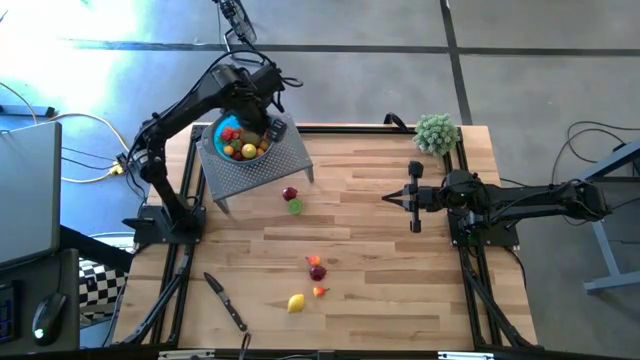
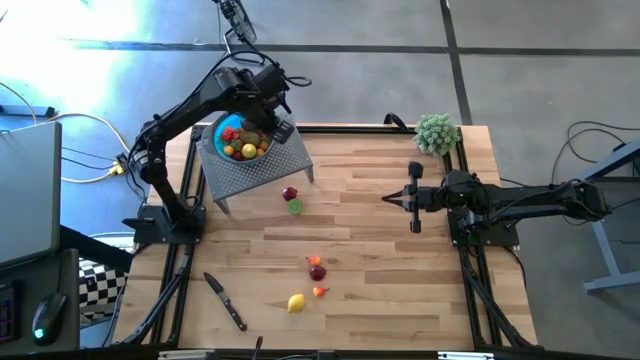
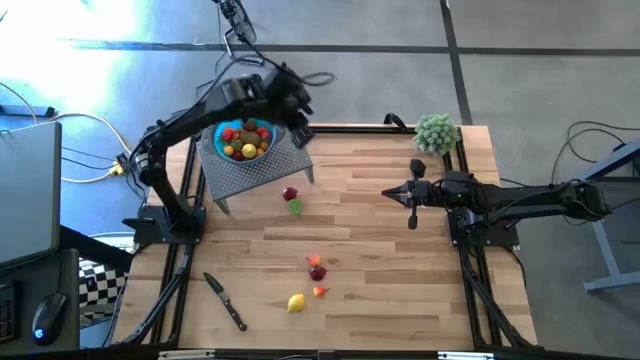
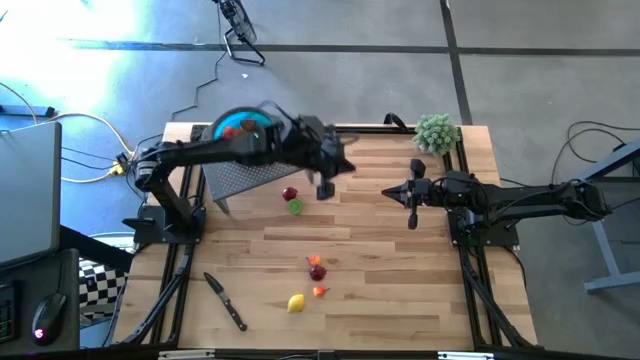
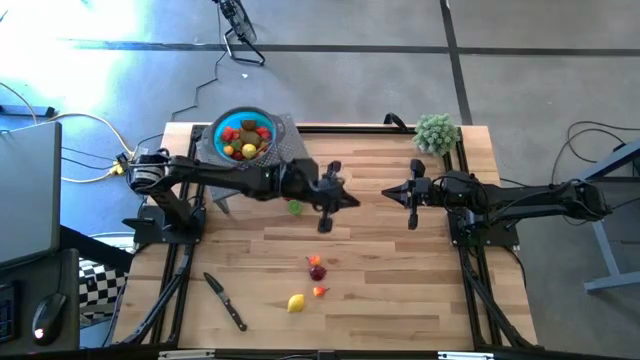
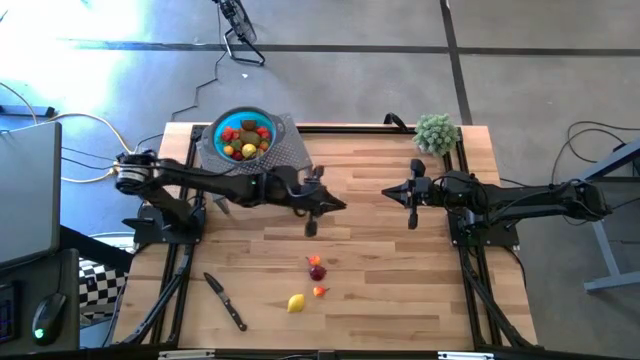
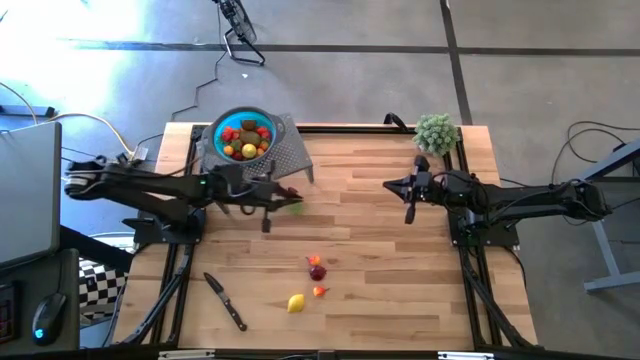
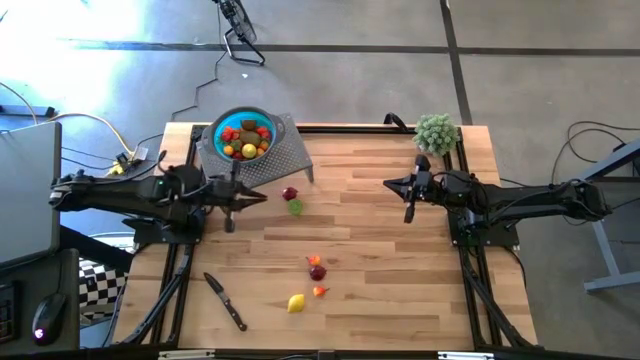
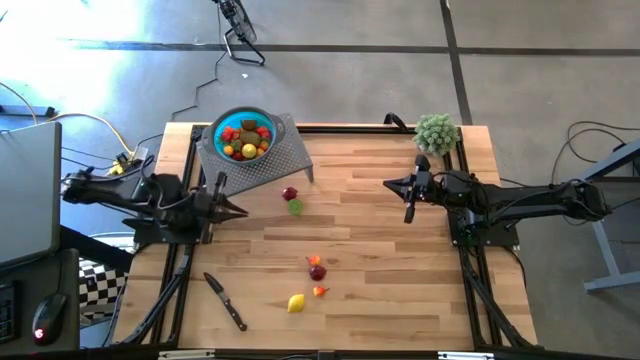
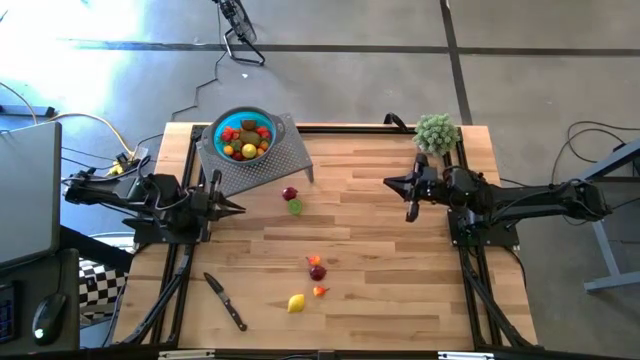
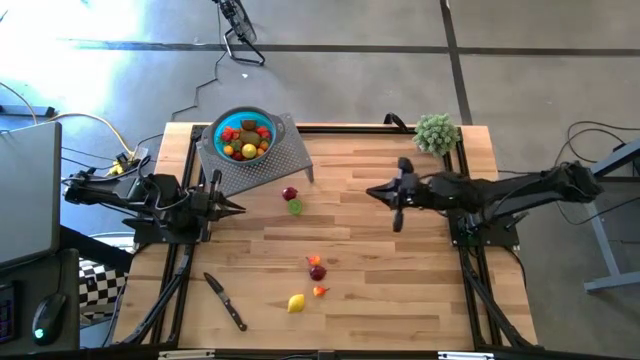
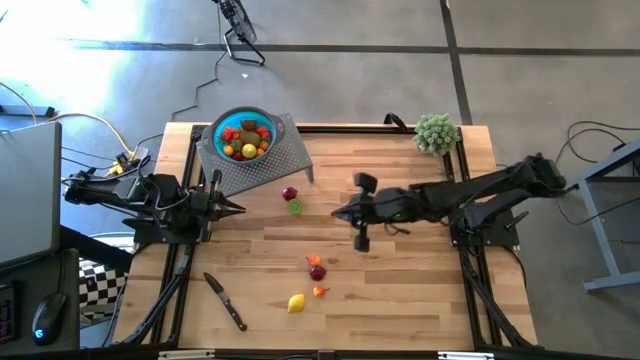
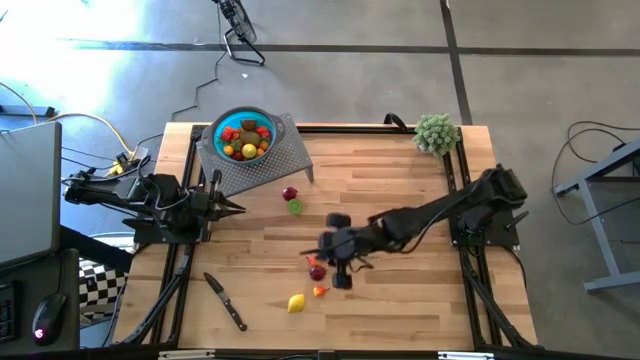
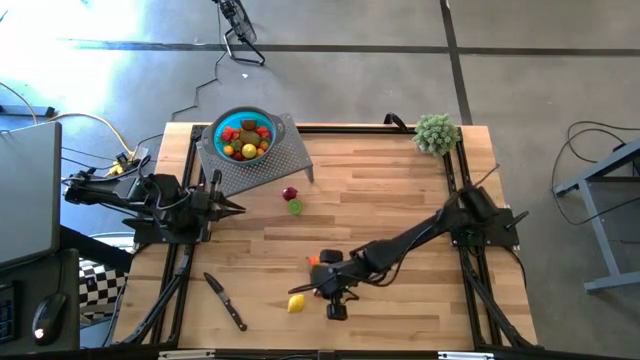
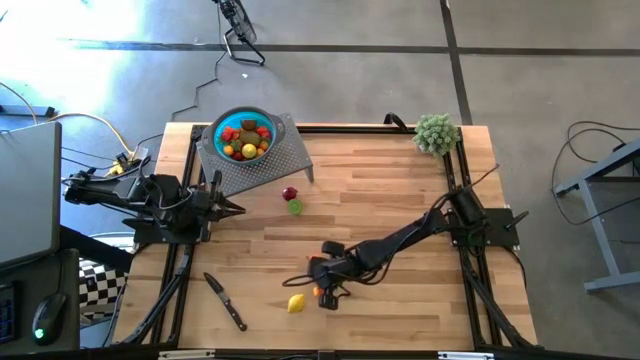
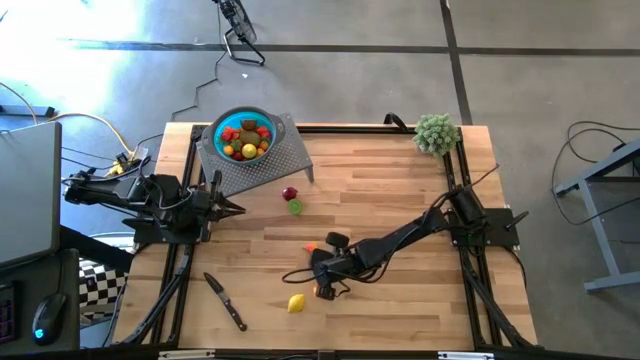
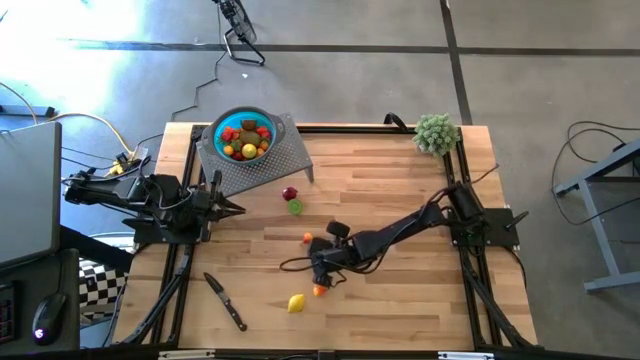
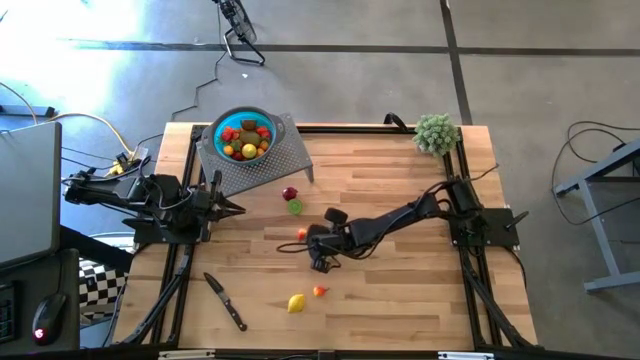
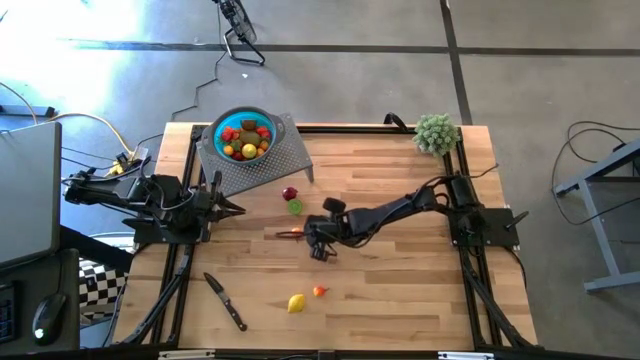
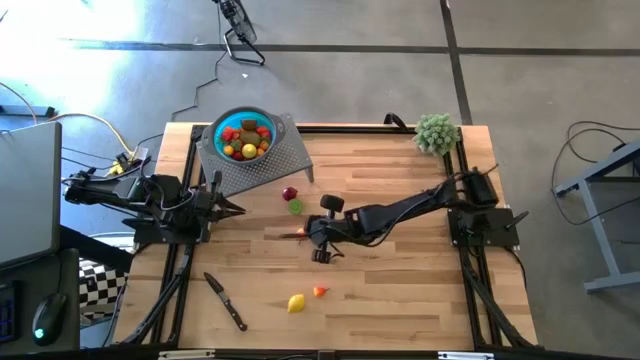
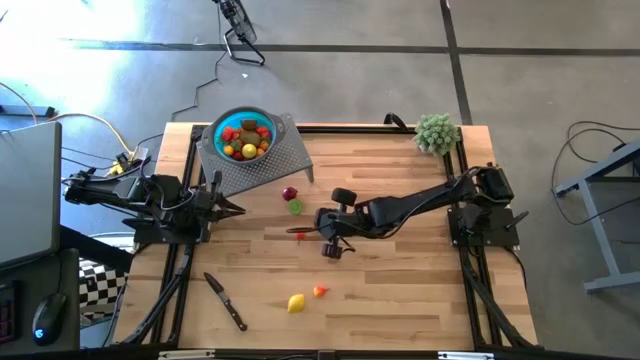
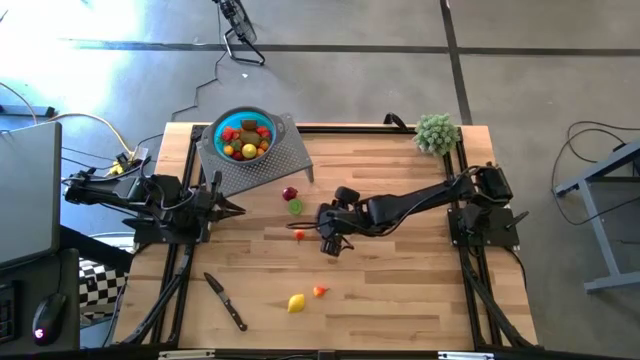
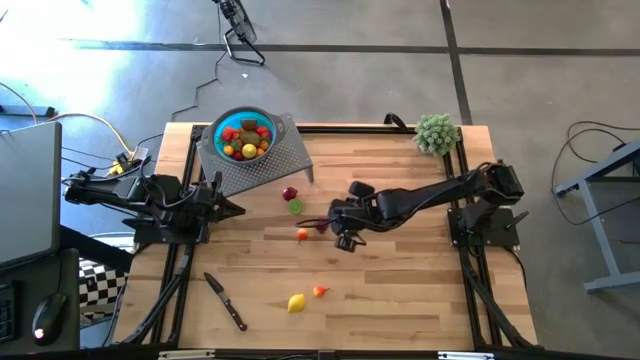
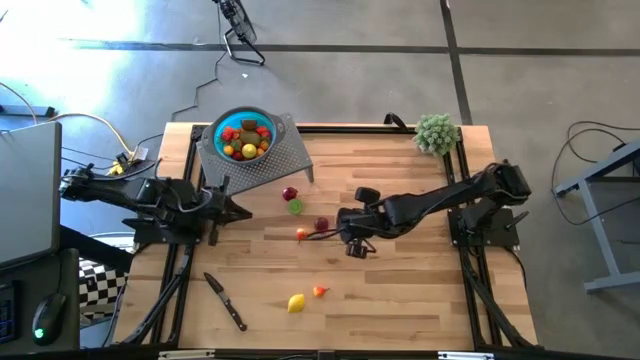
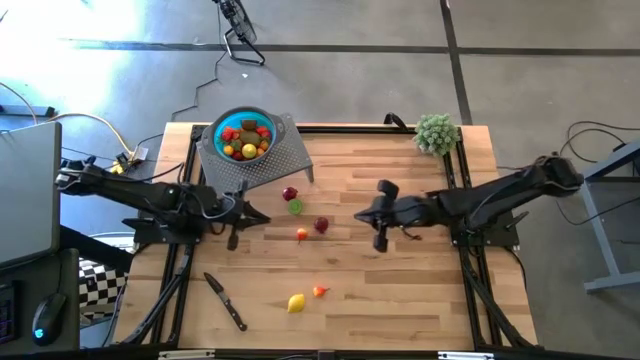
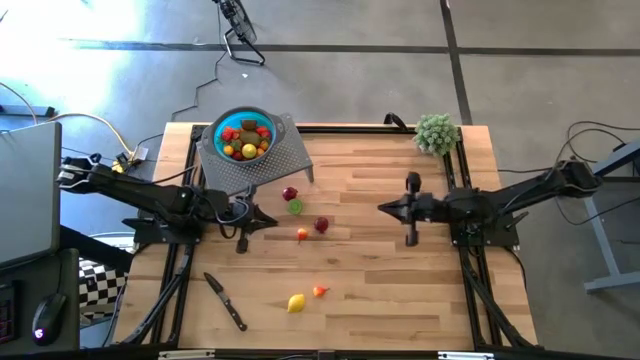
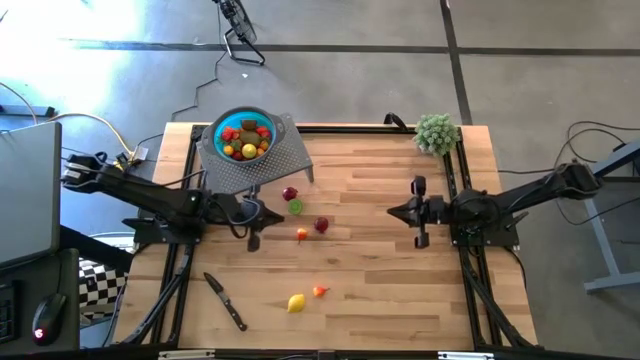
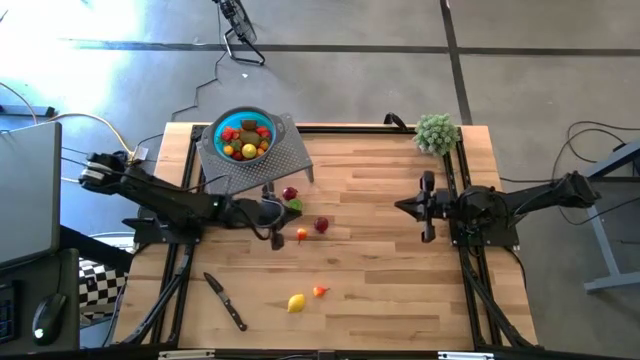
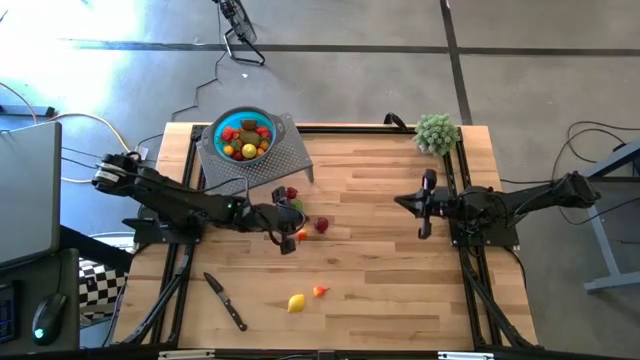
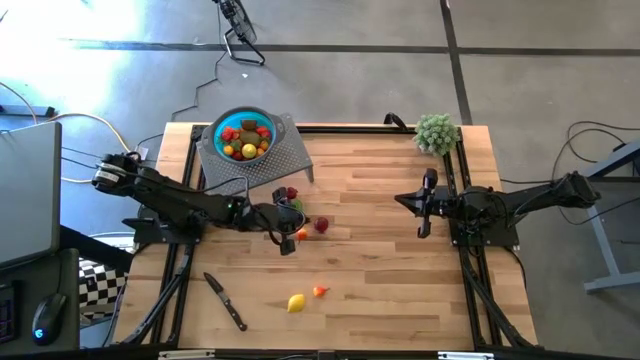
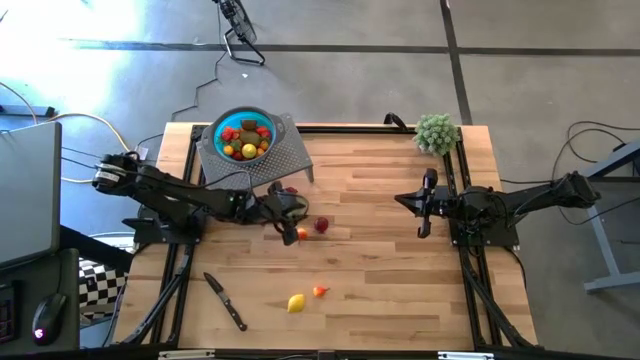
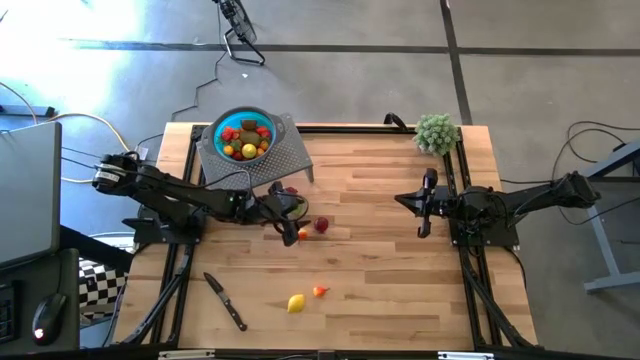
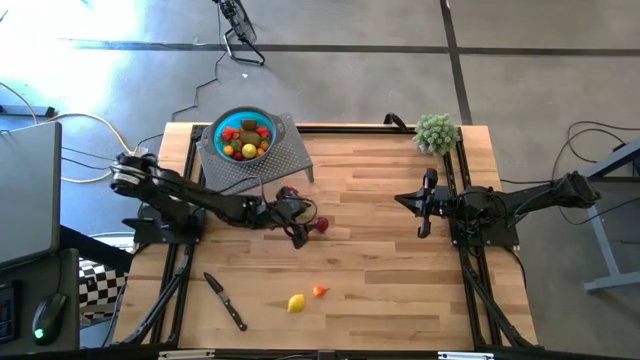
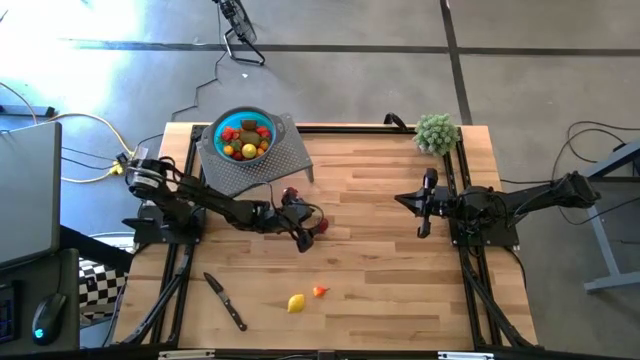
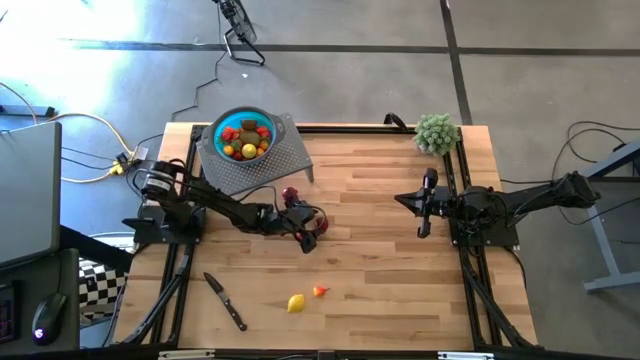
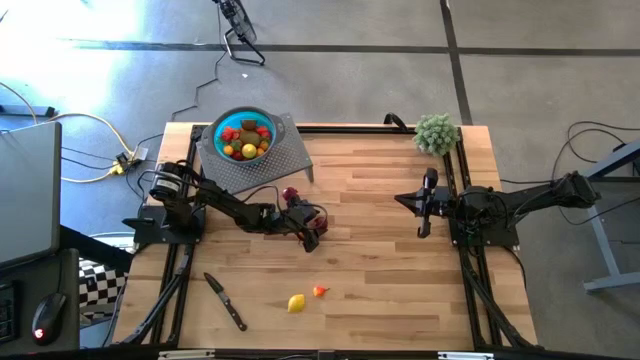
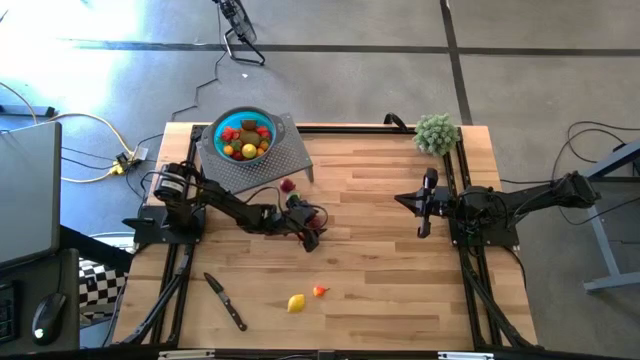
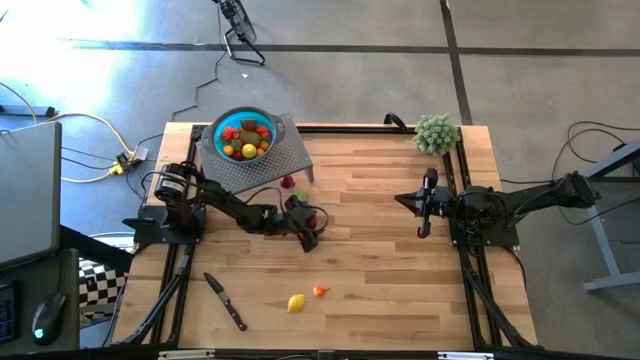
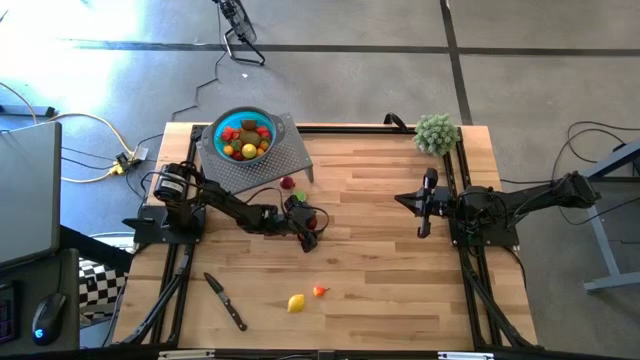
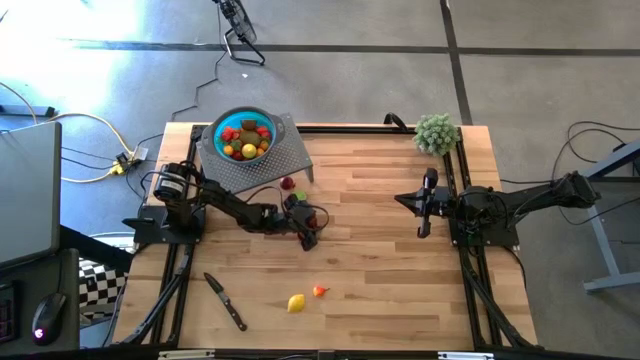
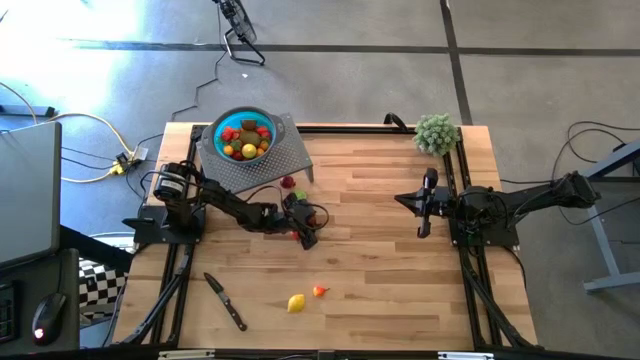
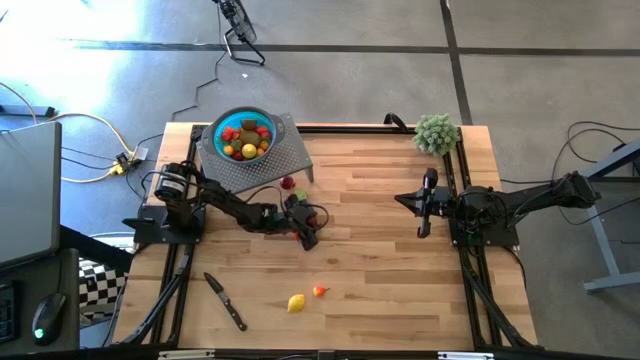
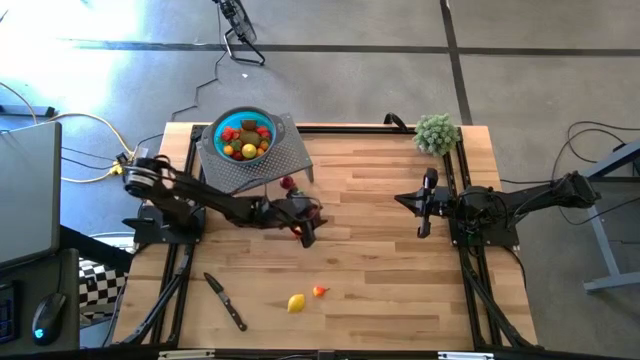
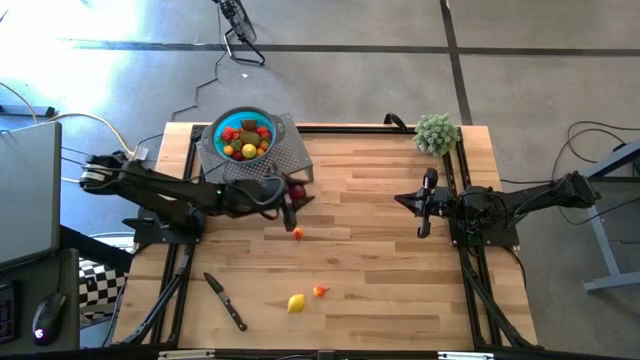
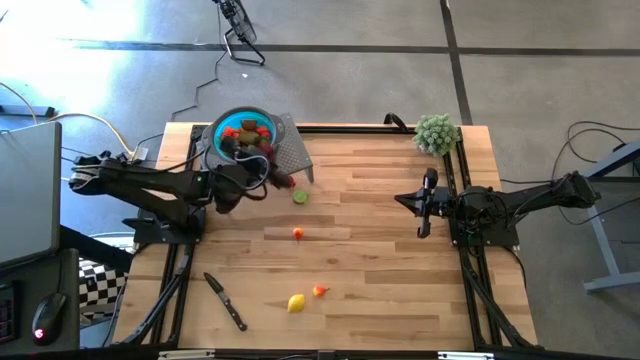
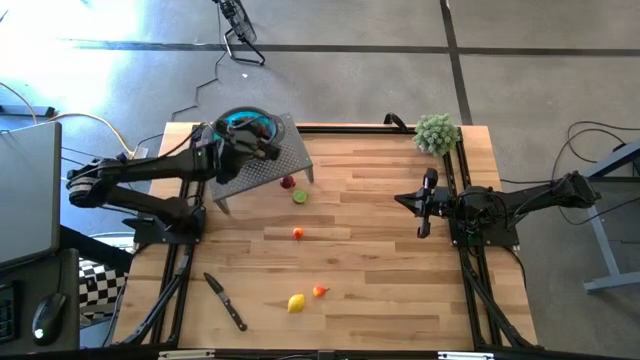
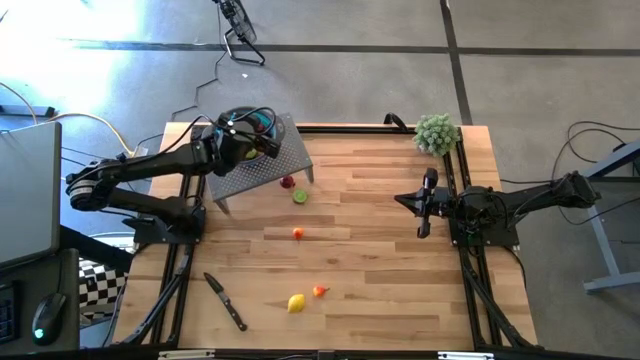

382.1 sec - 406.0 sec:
Task: Pick & Place Fruit
Put the red pomegranate into the blue strainer bowl on the shelf
